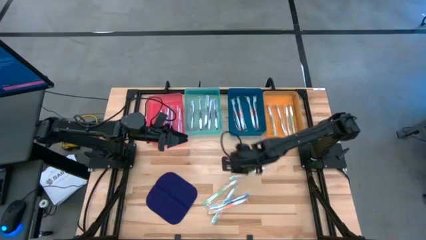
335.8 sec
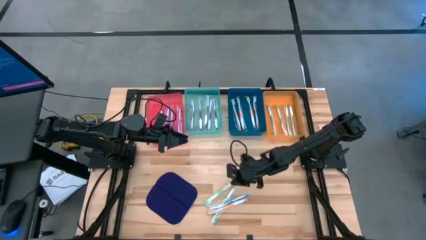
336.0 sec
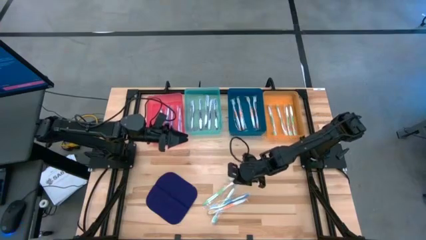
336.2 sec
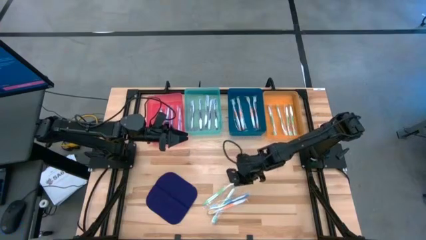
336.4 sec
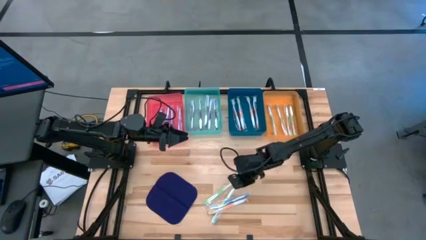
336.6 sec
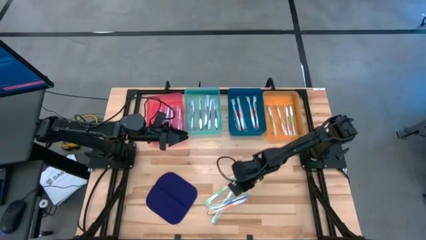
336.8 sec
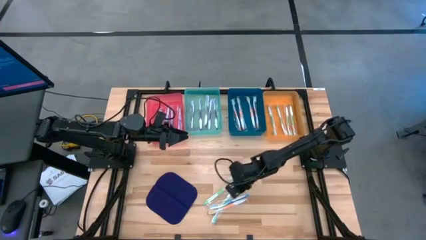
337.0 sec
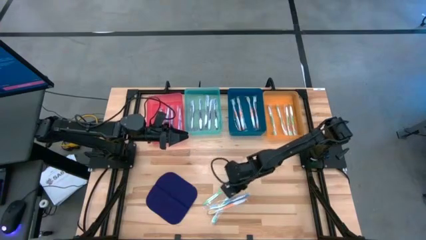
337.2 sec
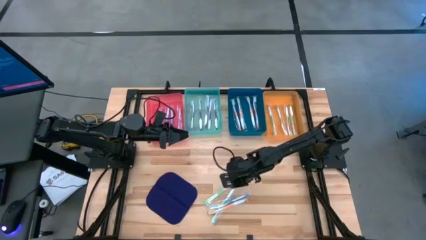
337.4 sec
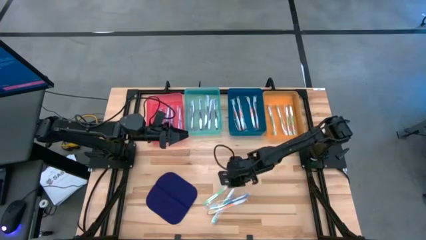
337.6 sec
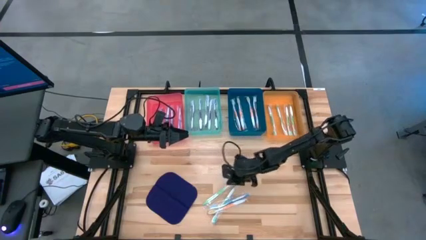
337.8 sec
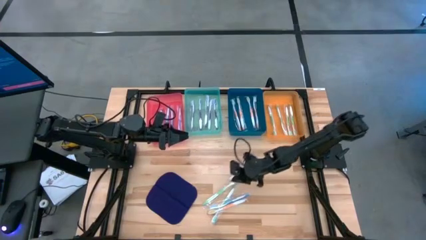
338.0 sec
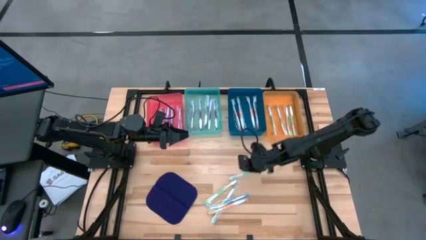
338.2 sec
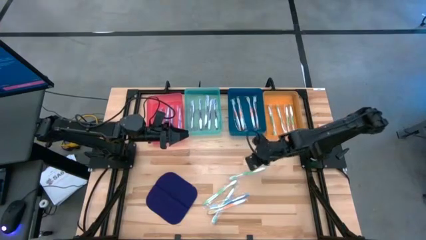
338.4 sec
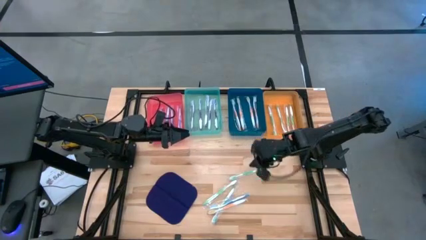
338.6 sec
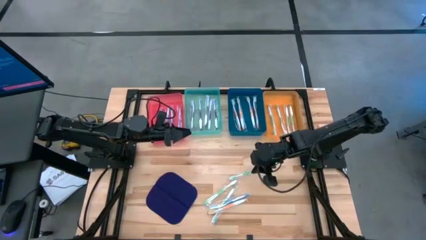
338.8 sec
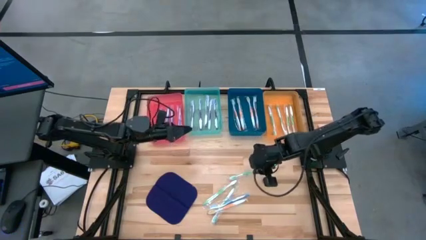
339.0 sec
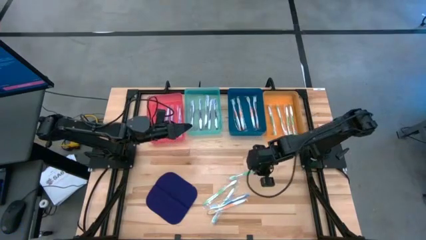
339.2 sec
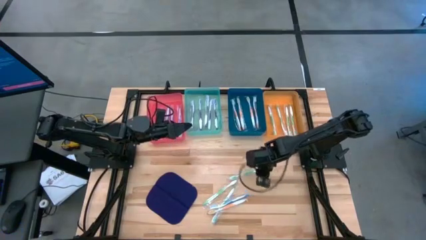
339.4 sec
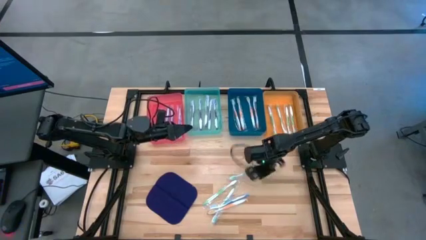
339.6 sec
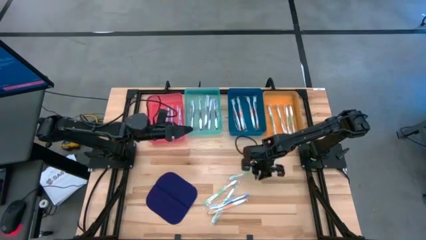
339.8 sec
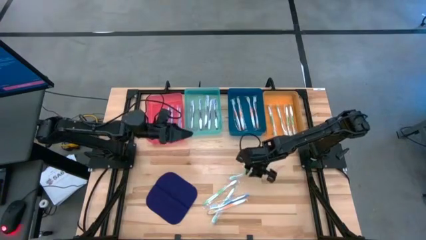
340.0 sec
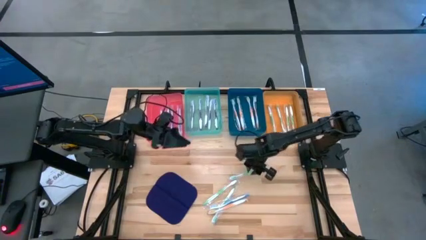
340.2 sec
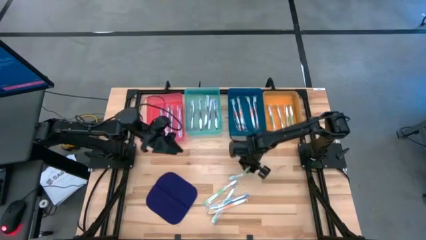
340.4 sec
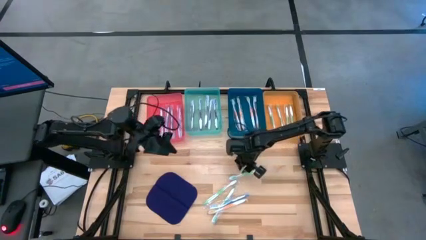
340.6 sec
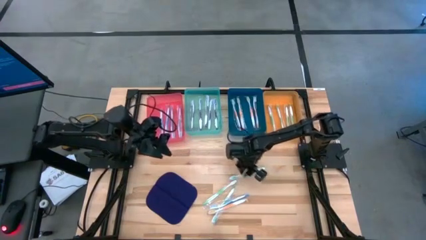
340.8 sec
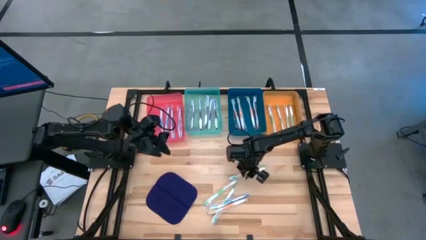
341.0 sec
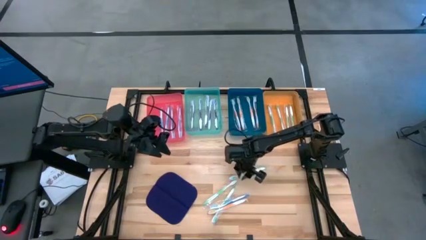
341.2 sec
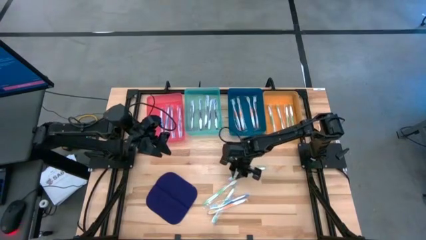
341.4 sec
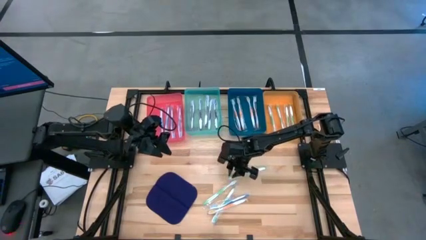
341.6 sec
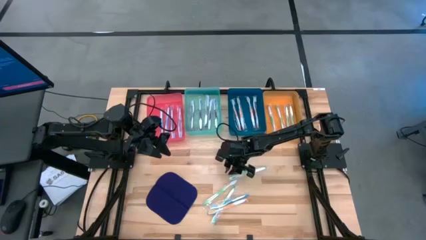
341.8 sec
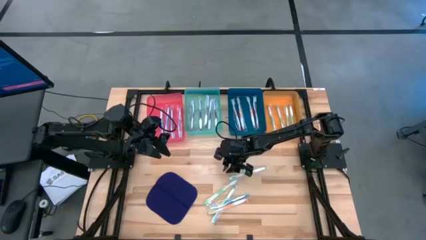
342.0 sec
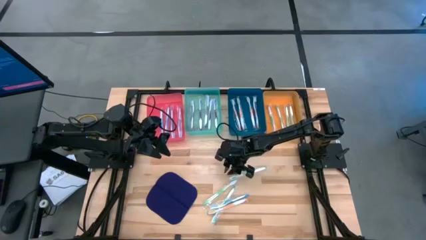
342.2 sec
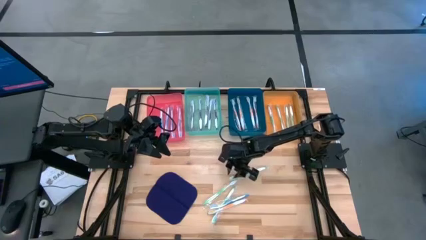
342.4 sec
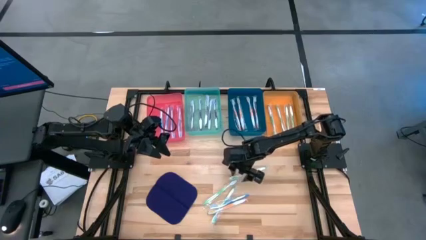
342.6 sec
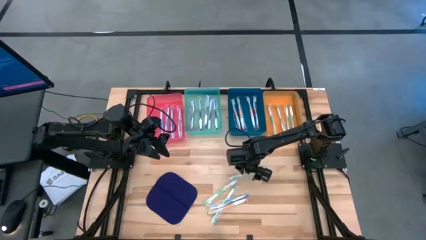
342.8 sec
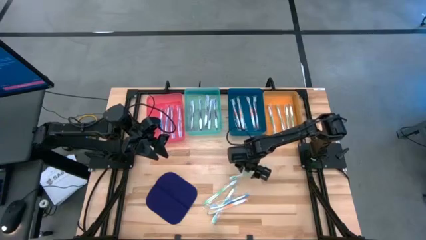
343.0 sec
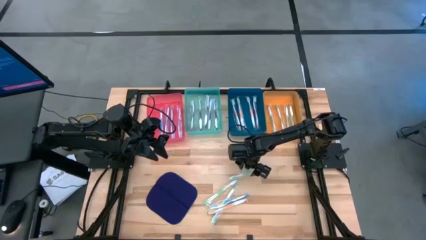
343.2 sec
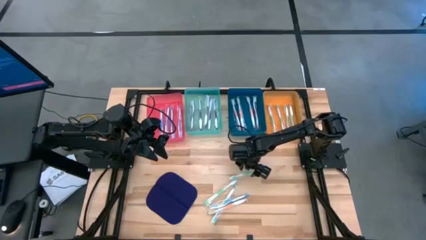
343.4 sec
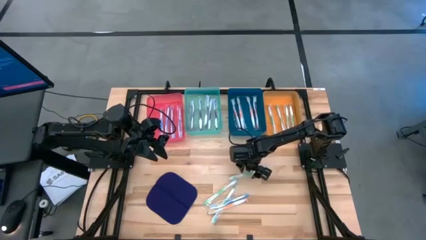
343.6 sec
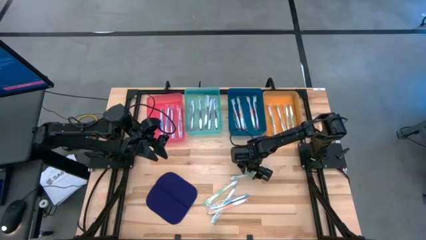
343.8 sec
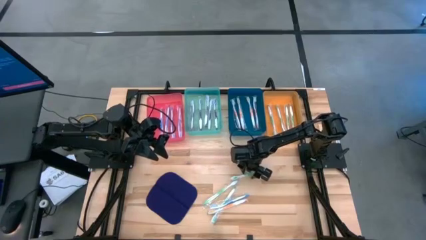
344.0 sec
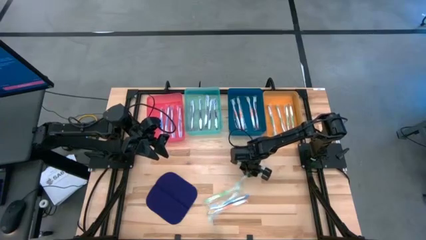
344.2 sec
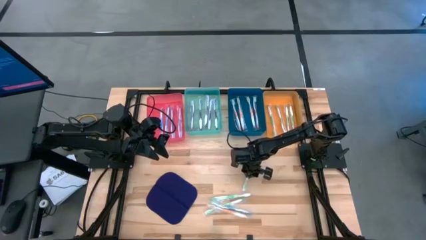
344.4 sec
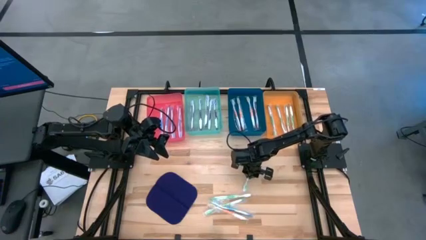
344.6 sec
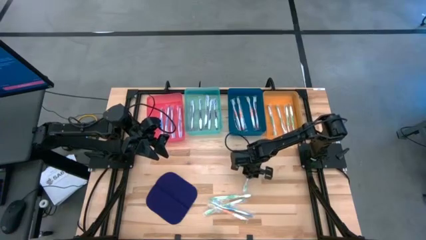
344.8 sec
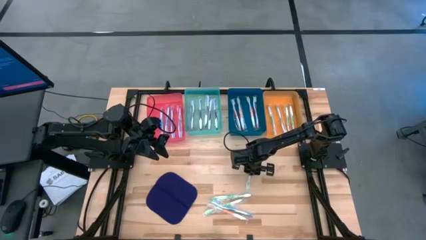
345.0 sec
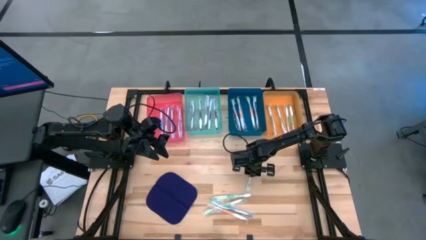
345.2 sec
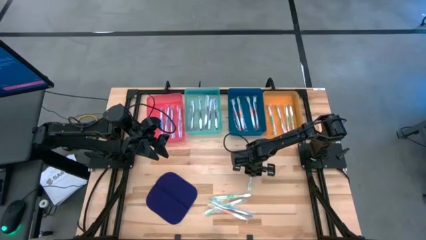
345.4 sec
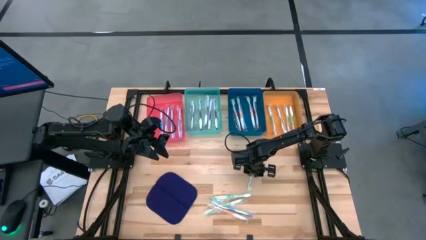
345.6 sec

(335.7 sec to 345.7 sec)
Task: Pick & Place Toothbrushes
Put the green toothbrush into the orange bin

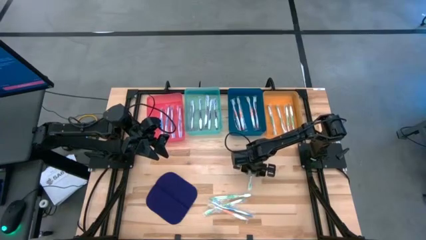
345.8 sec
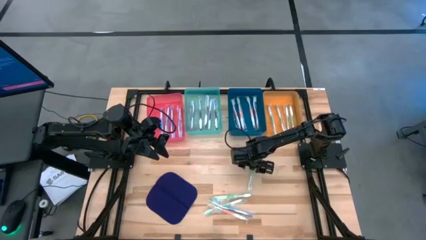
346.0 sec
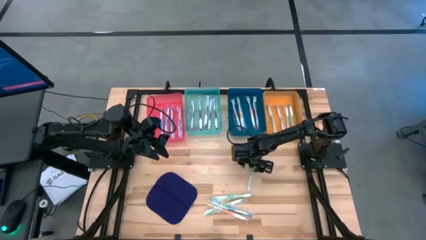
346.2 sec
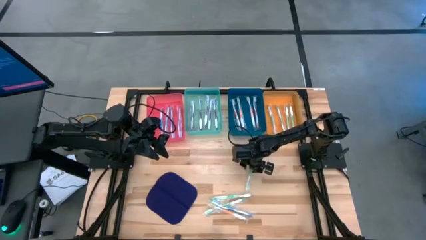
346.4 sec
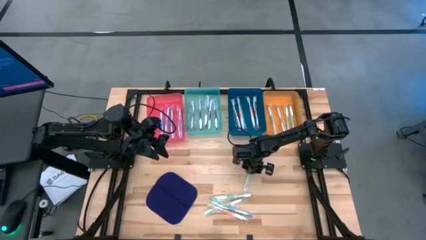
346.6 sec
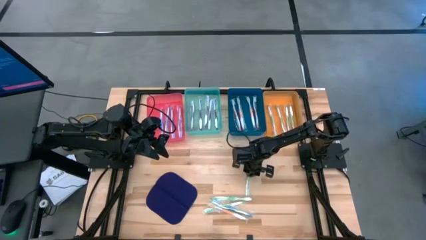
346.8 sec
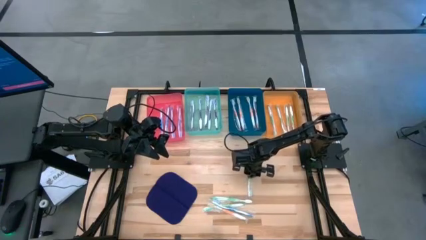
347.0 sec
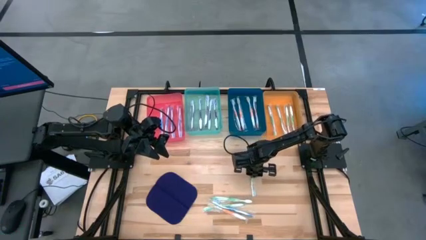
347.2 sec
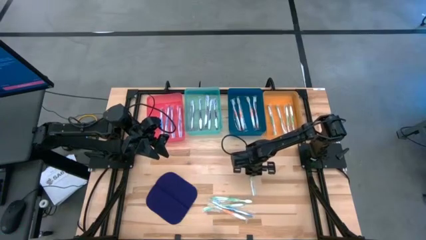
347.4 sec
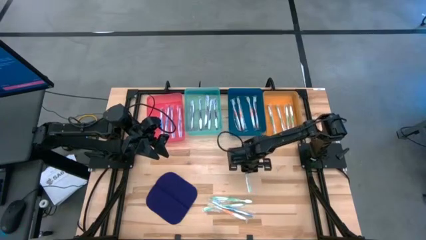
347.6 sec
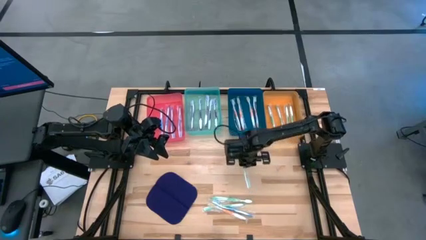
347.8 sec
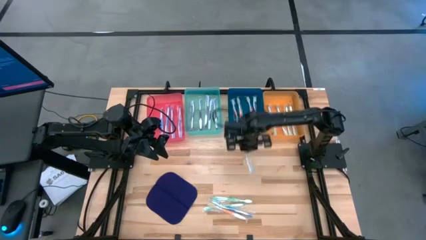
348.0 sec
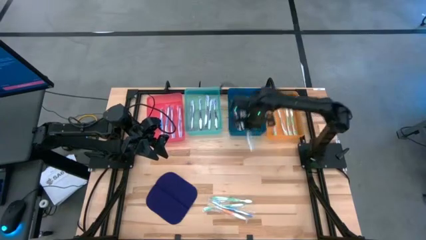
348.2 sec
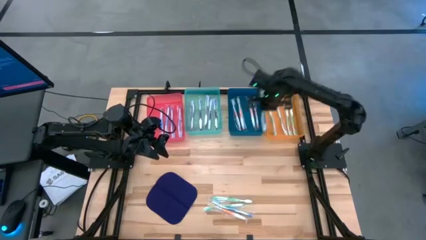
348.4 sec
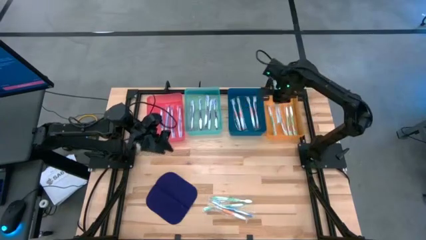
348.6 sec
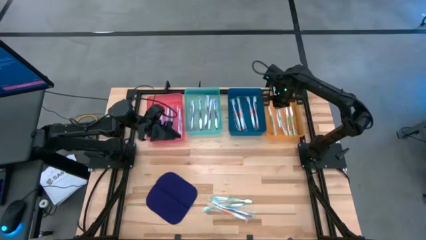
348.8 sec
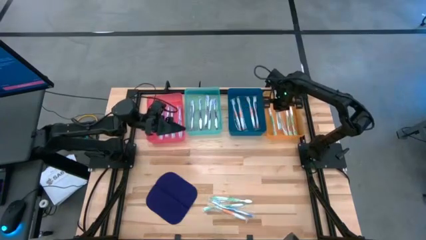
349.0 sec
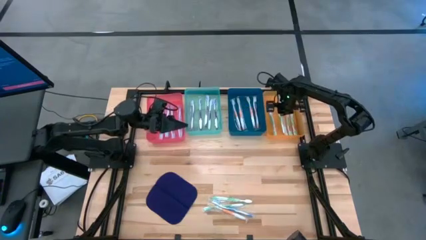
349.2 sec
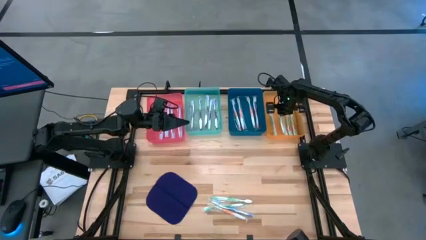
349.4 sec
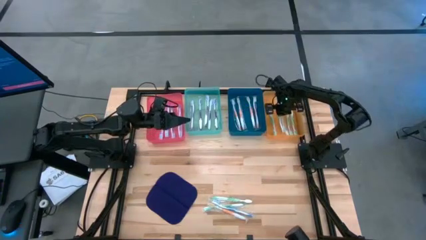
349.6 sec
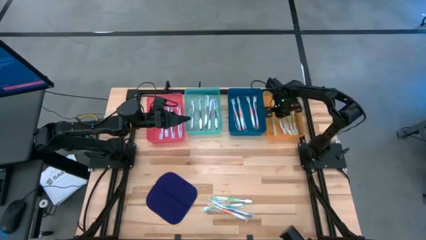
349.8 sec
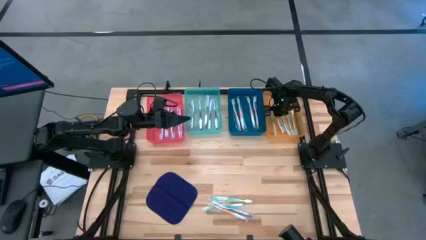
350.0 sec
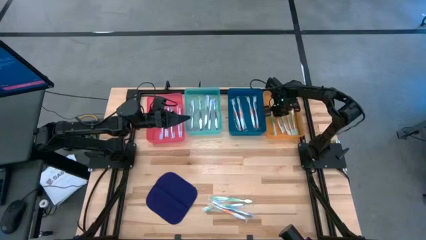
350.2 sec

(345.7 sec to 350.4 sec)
Put the green toothbrush into the orange bin
